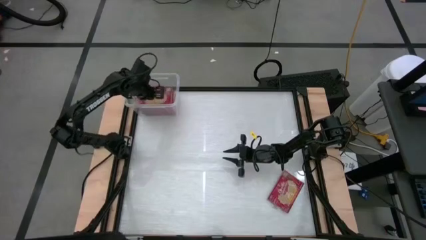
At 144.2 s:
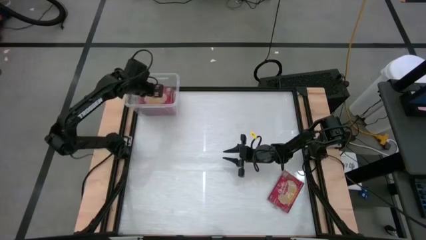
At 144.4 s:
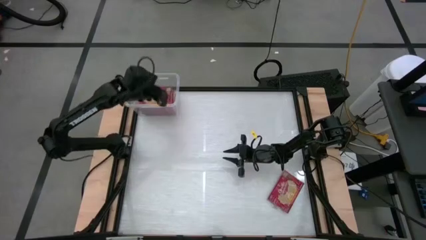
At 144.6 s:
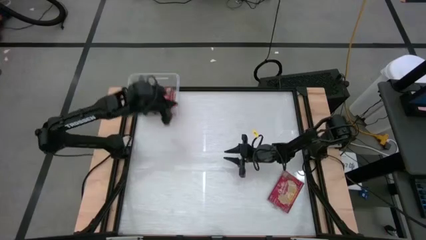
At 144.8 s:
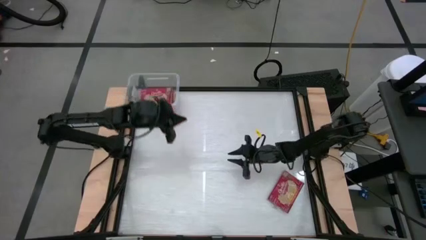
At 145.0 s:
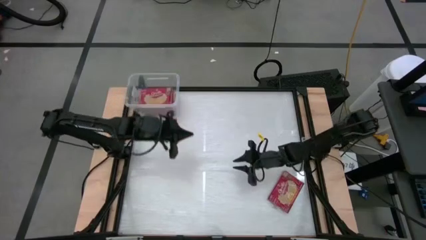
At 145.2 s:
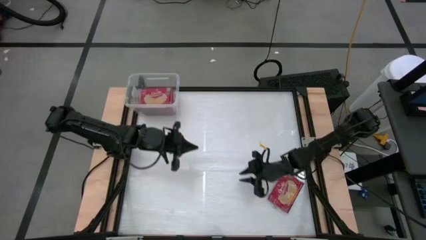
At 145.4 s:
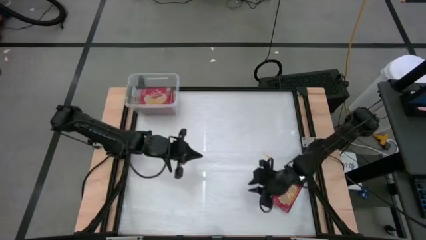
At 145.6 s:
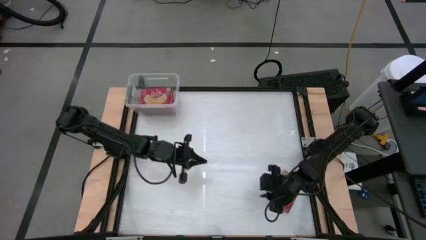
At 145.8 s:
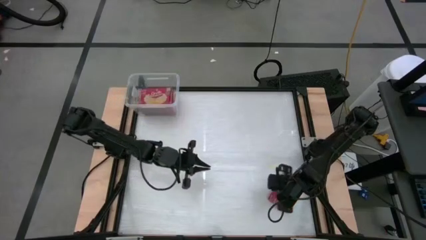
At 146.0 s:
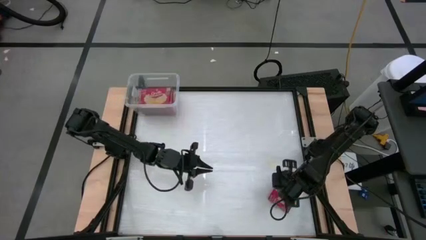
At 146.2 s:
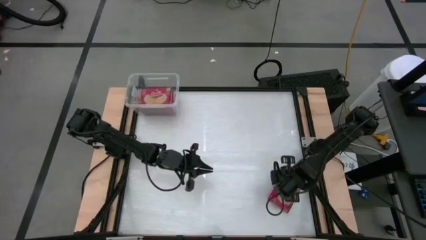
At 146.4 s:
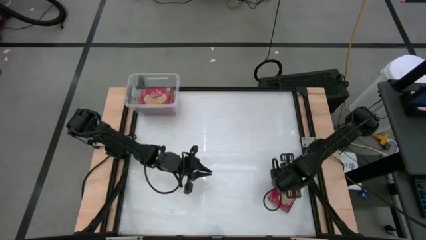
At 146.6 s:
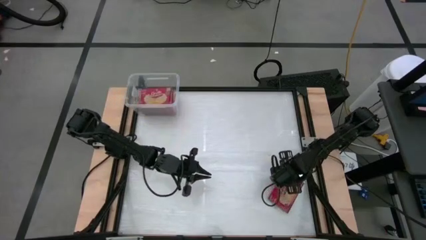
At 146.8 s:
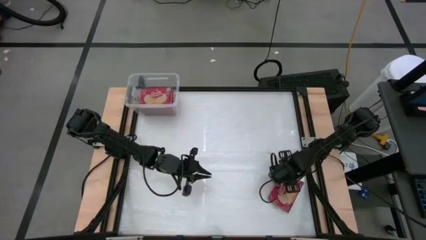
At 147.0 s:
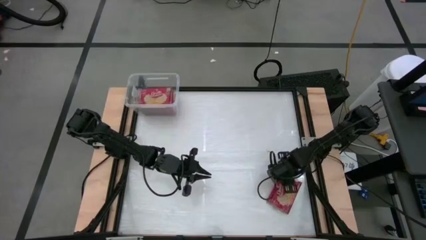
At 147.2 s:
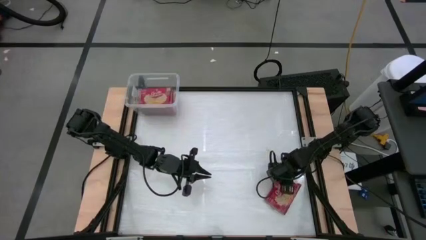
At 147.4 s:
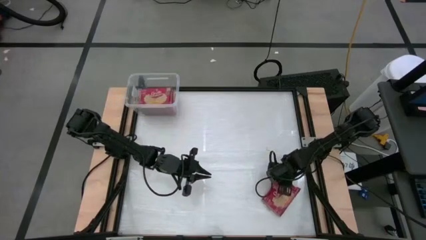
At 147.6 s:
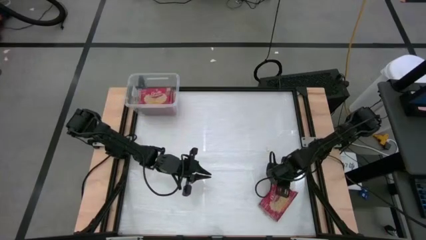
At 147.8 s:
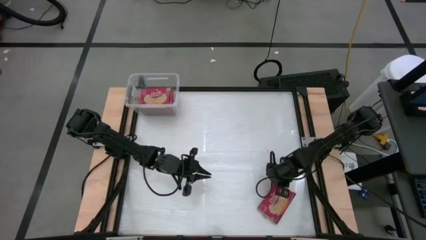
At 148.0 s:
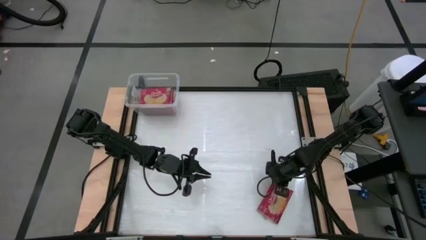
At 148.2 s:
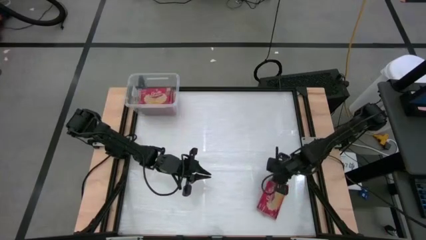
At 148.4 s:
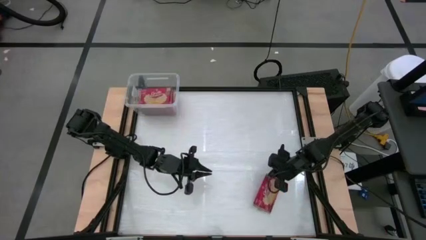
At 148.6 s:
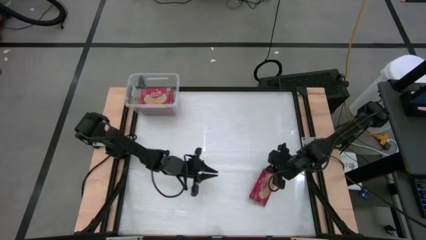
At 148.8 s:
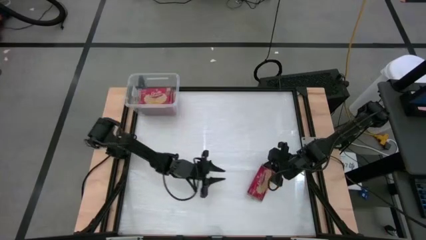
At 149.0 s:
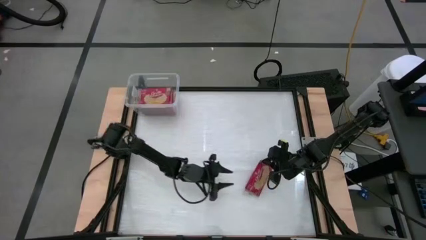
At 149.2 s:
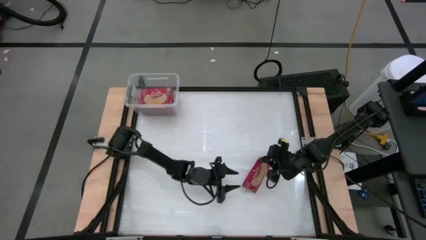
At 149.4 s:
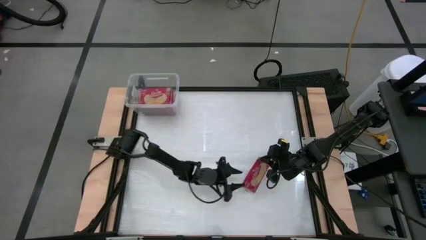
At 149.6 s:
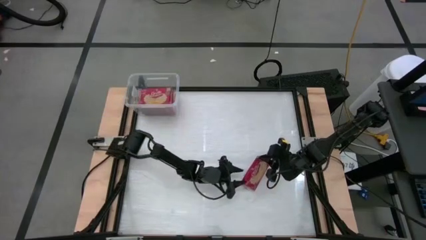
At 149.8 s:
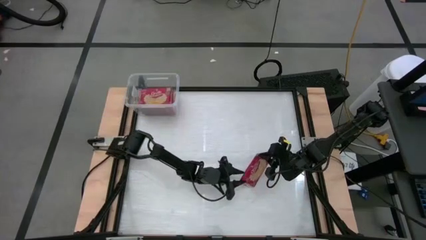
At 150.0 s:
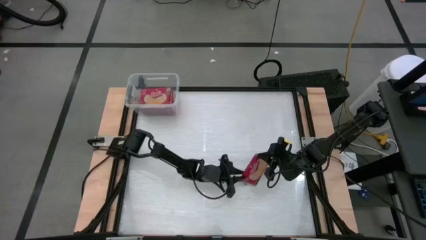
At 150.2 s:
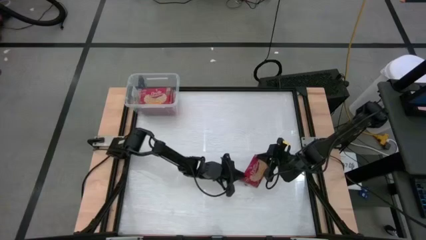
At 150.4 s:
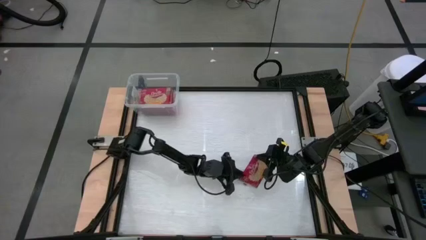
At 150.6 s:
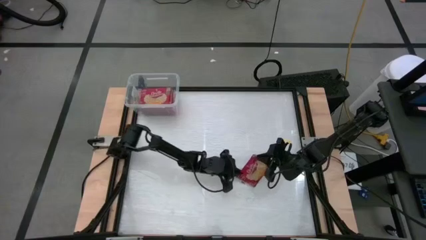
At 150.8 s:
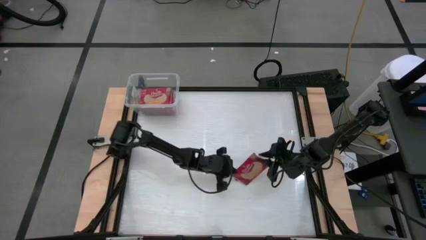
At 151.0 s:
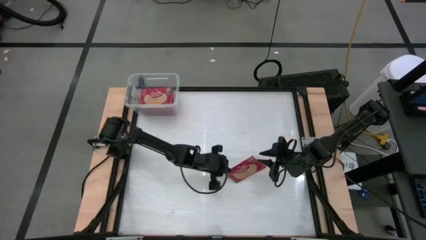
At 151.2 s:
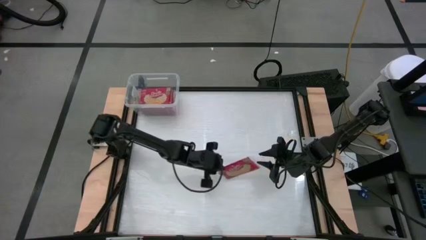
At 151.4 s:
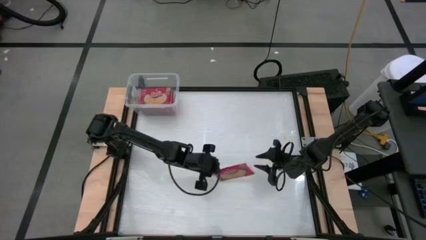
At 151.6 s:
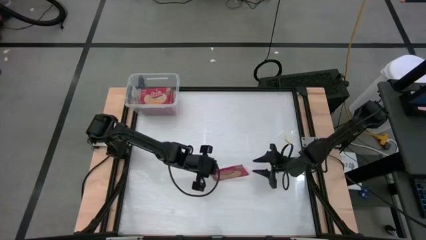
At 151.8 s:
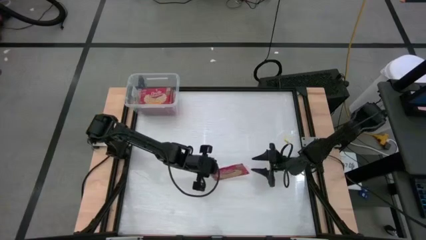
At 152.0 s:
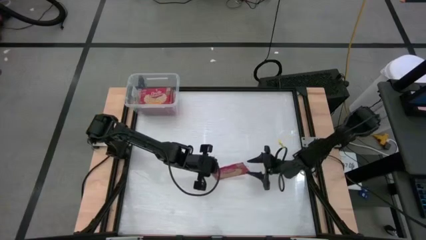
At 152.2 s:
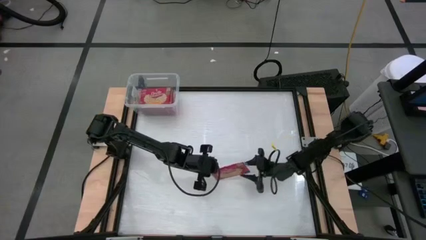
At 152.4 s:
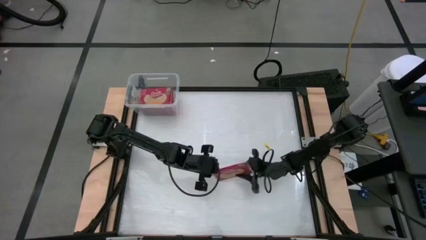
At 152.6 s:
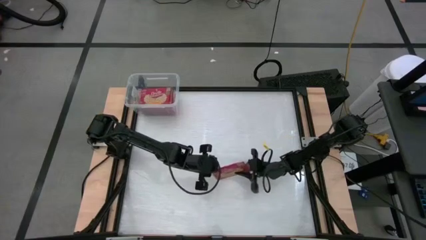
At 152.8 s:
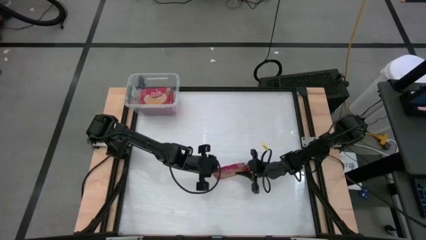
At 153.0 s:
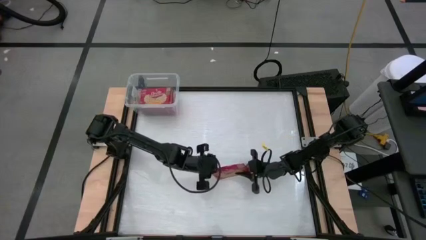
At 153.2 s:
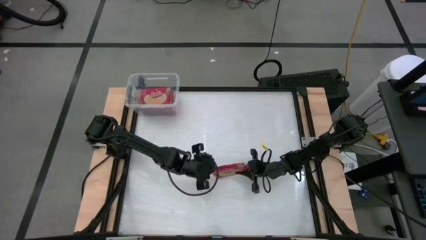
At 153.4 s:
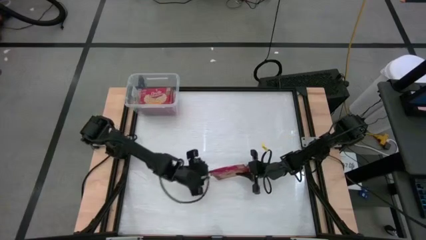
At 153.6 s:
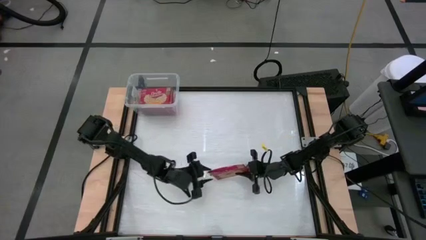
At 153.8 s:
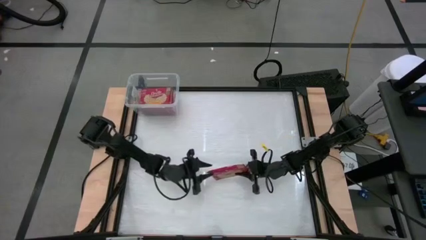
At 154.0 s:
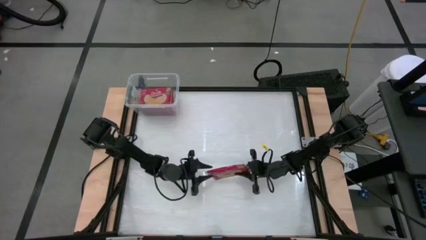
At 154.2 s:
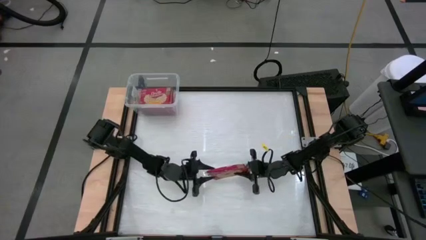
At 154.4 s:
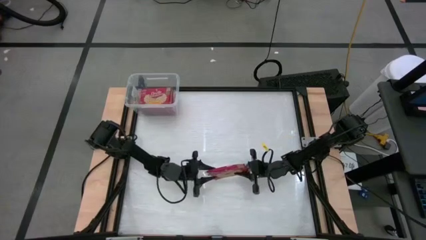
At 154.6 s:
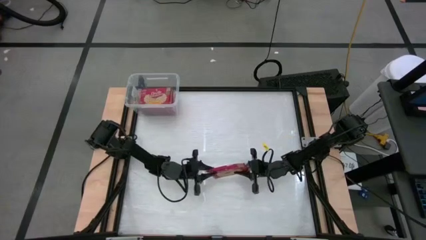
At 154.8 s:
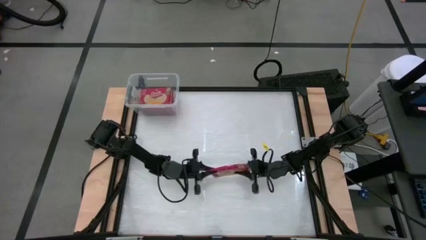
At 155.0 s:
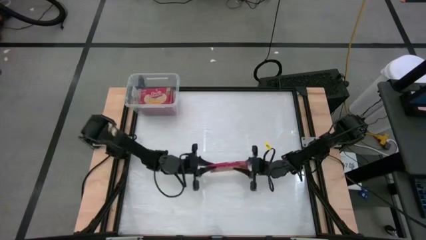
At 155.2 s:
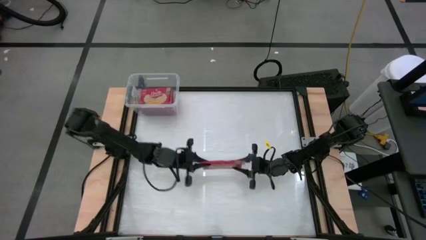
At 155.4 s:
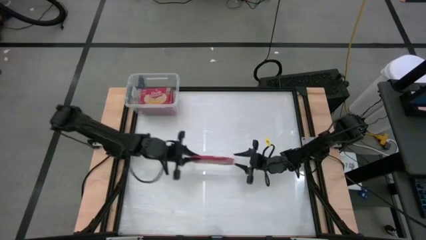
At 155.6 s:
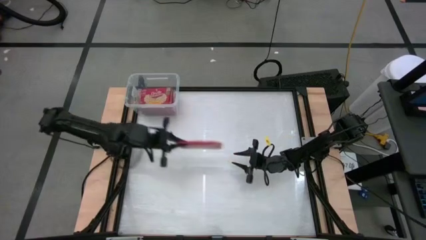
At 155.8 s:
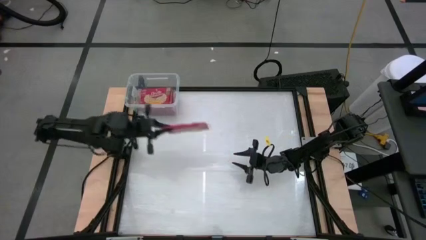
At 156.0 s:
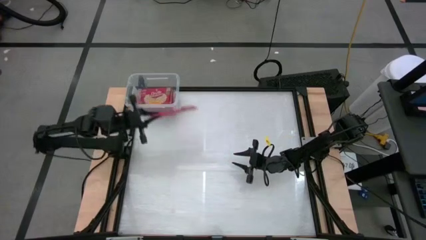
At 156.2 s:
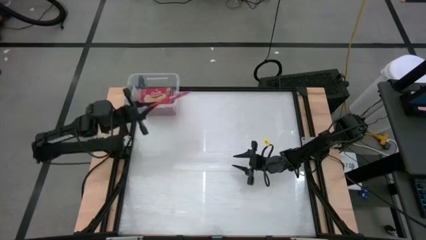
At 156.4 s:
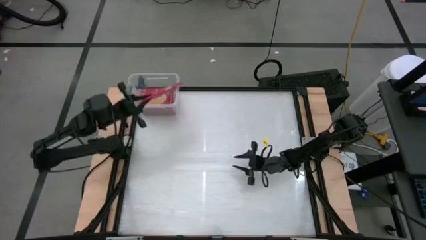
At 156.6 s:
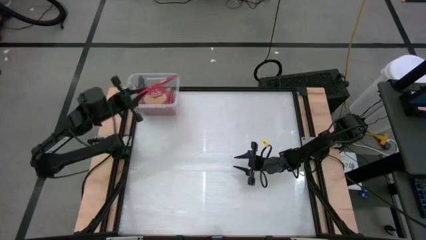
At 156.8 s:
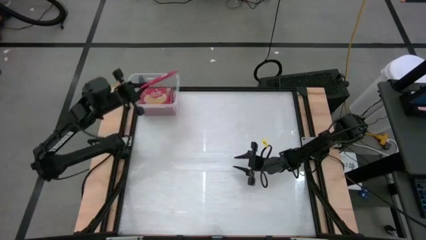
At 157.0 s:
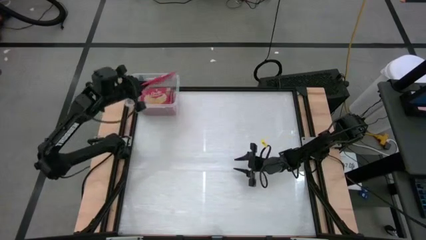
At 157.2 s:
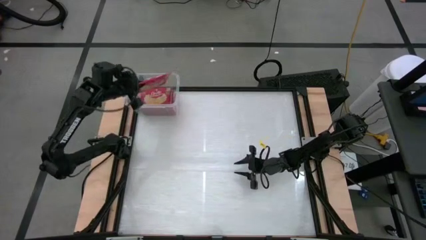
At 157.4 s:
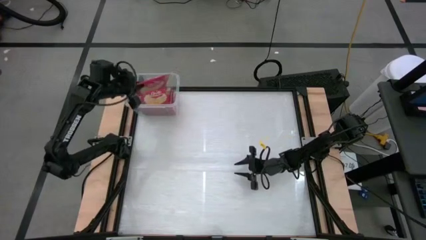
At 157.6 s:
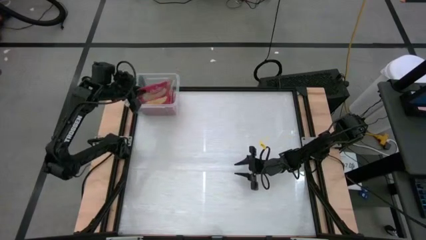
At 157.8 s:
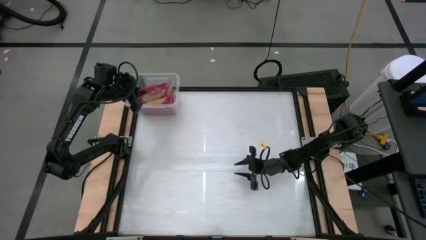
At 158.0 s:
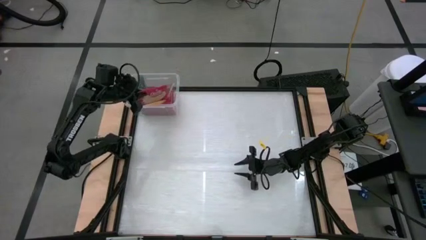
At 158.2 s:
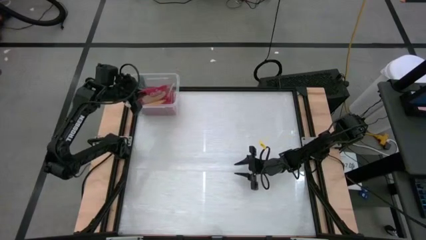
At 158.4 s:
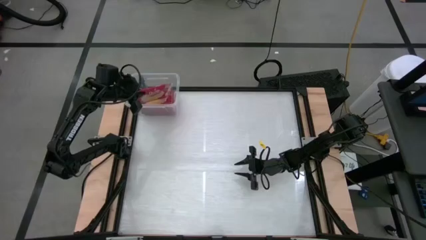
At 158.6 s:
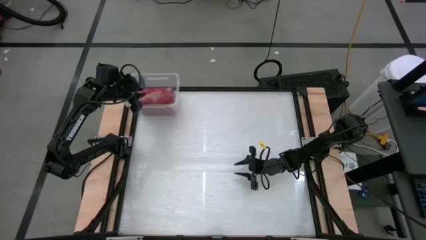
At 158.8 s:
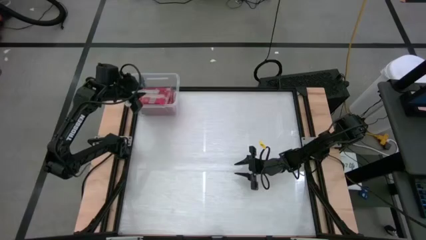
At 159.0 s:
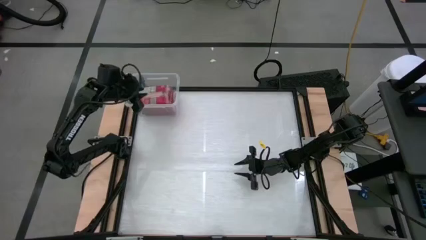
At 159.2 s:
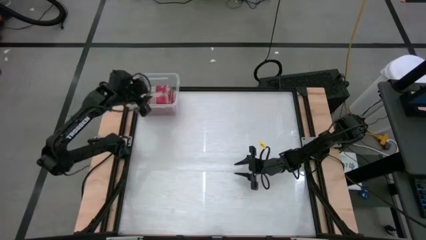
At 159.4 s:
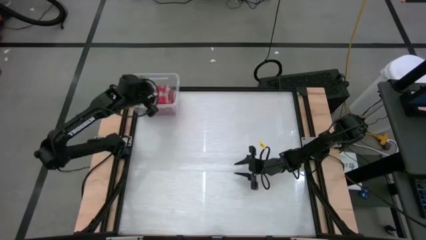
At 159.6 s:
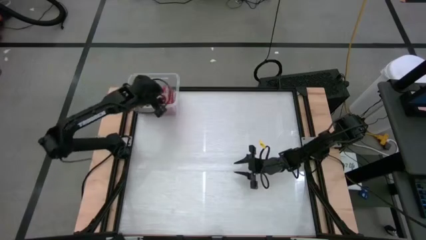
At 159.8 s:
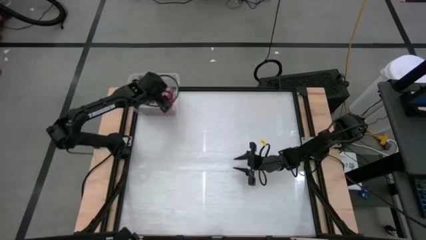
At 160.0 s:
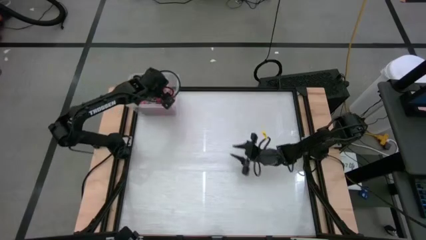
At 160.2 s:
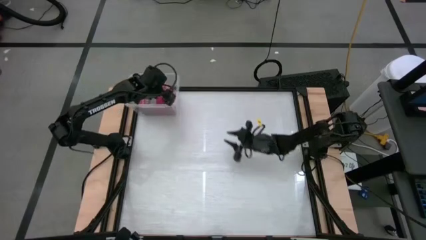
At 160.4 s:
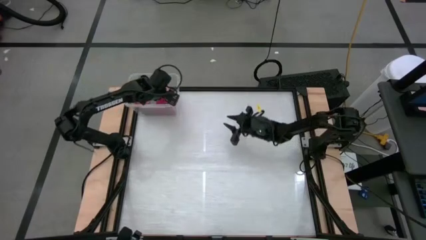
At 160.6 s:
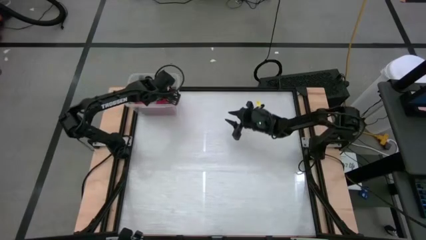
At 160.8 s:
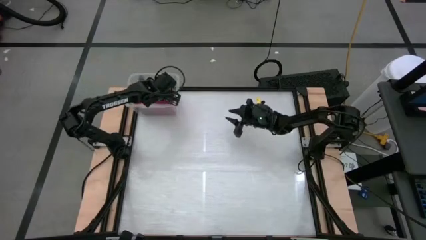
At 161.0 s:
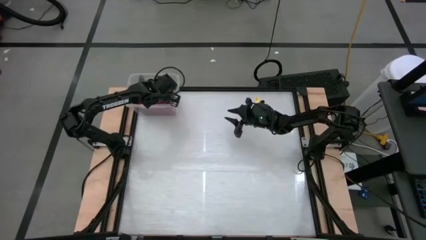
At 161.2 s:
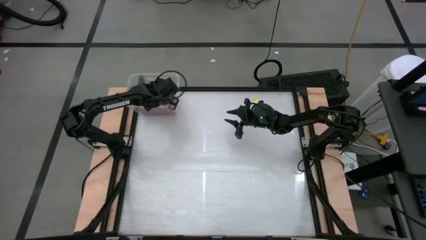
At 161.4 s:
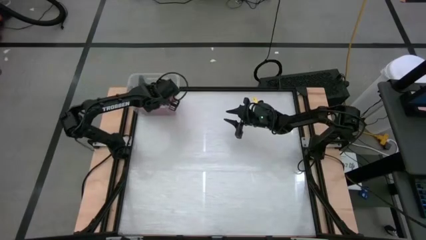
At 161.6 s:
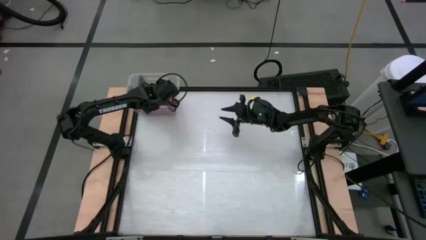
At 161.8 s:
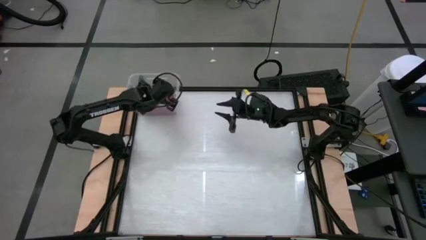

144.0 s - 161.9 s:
Task: Sort popcorn bags into baskets
Put the red popcorn bag into the transparent container
